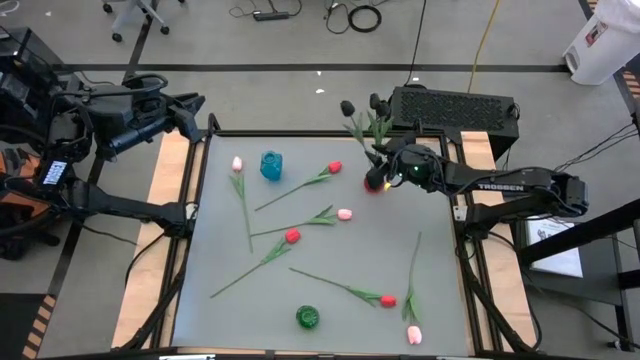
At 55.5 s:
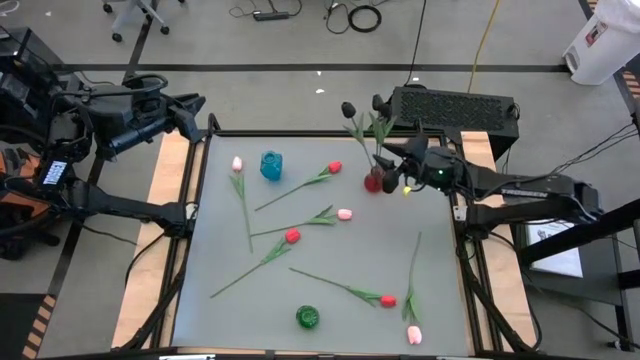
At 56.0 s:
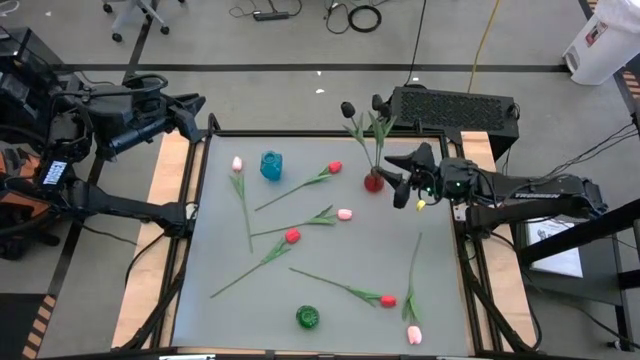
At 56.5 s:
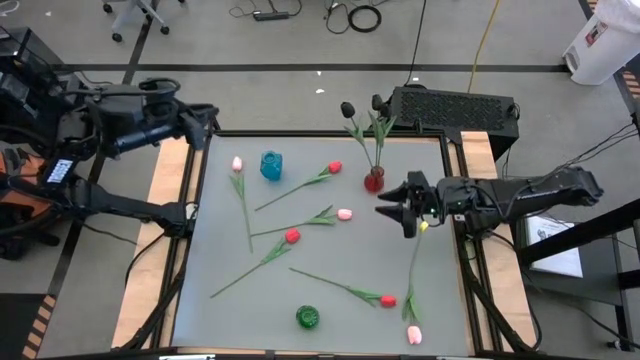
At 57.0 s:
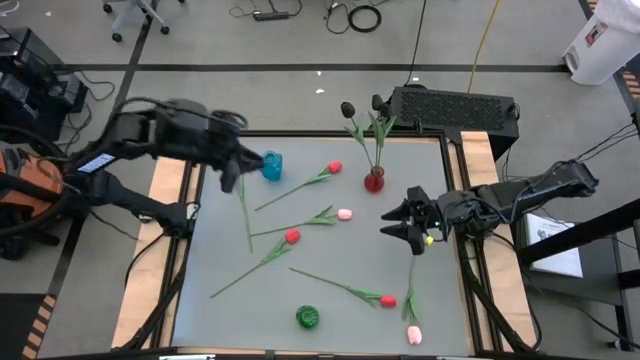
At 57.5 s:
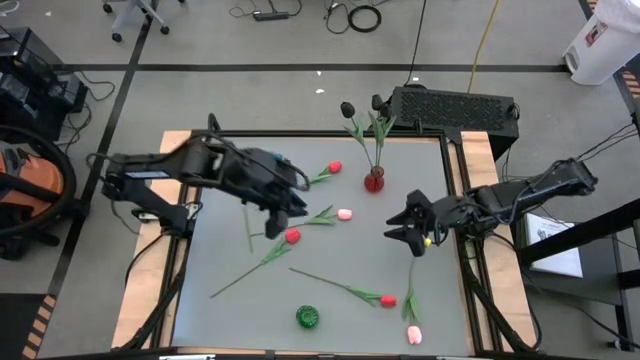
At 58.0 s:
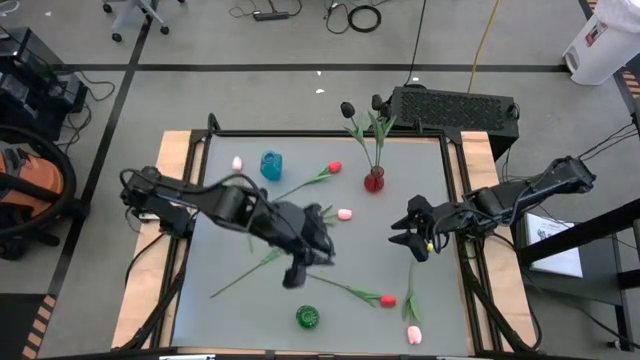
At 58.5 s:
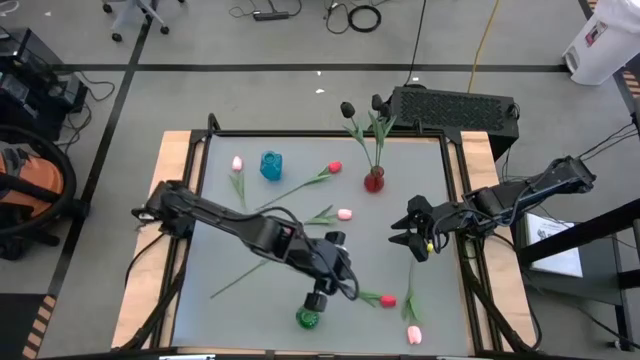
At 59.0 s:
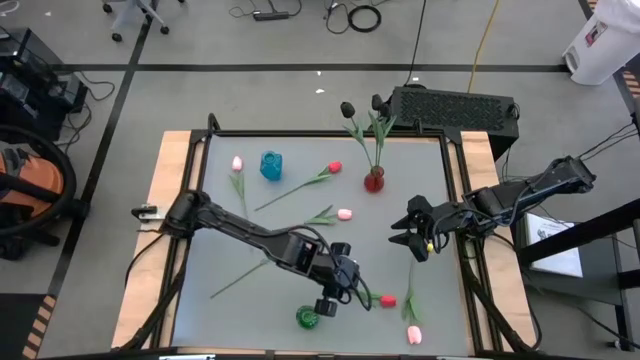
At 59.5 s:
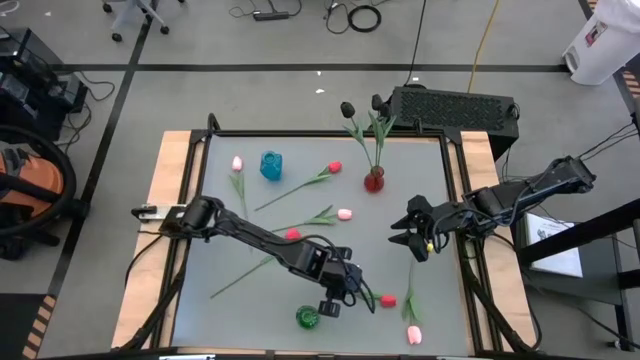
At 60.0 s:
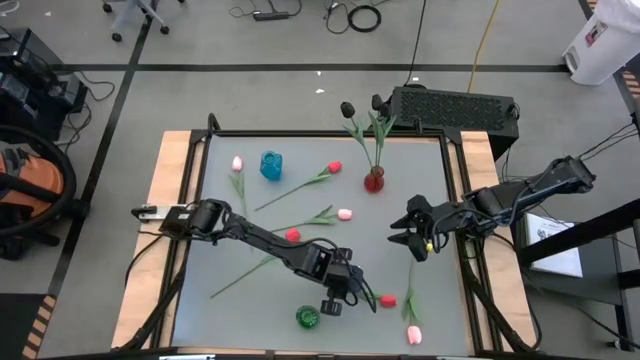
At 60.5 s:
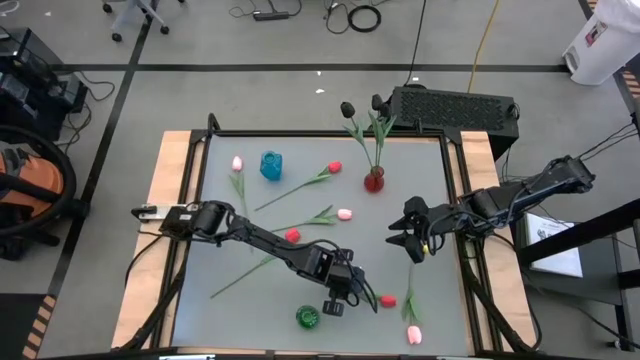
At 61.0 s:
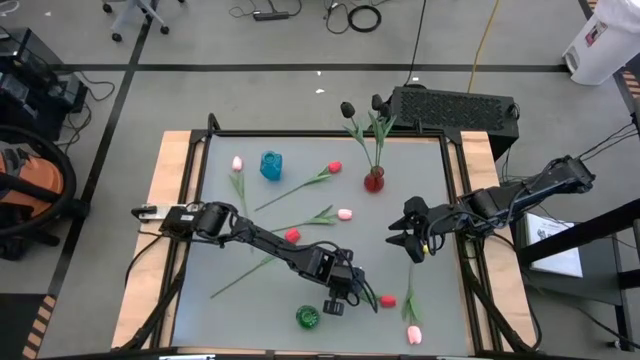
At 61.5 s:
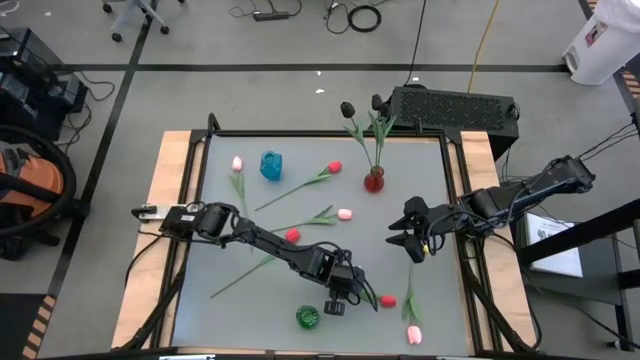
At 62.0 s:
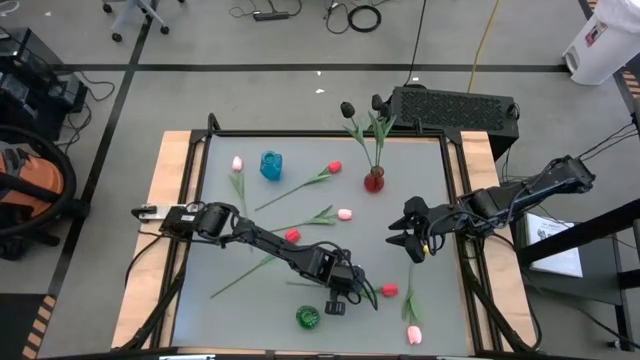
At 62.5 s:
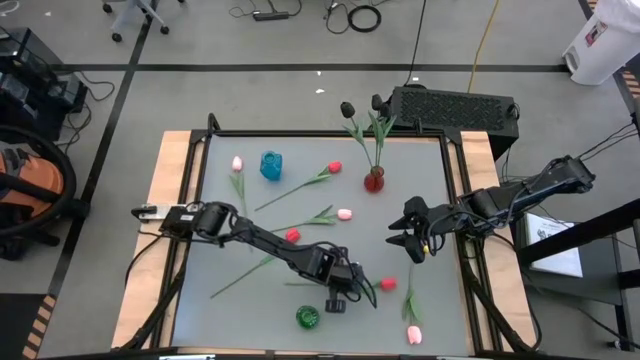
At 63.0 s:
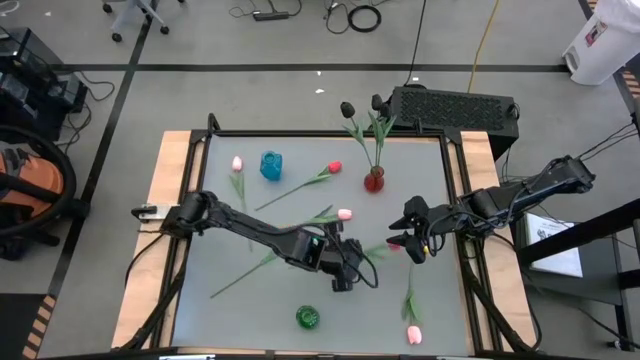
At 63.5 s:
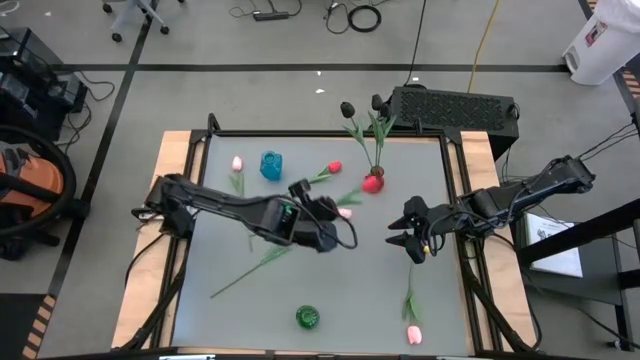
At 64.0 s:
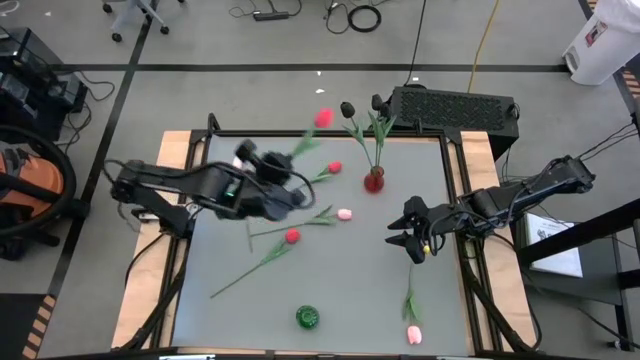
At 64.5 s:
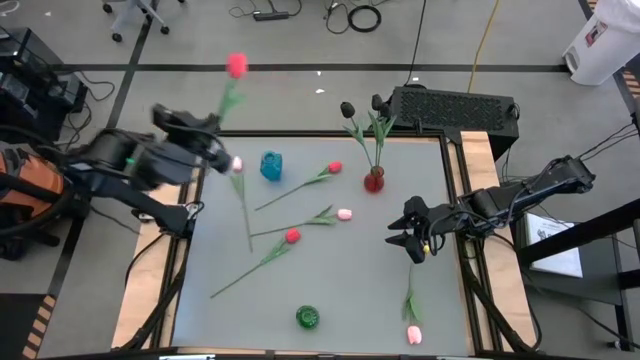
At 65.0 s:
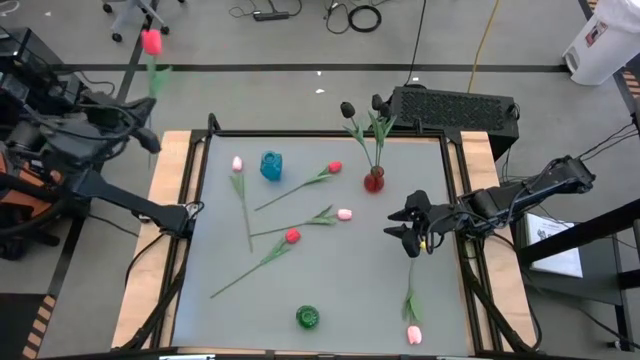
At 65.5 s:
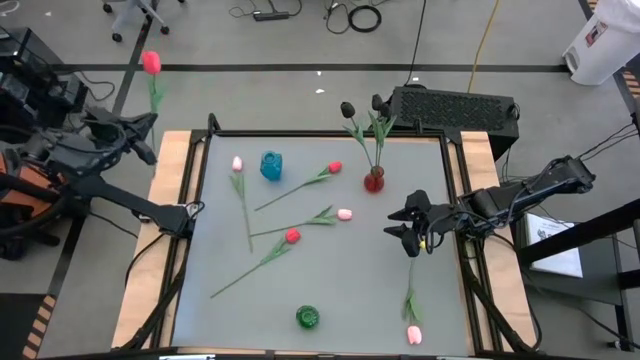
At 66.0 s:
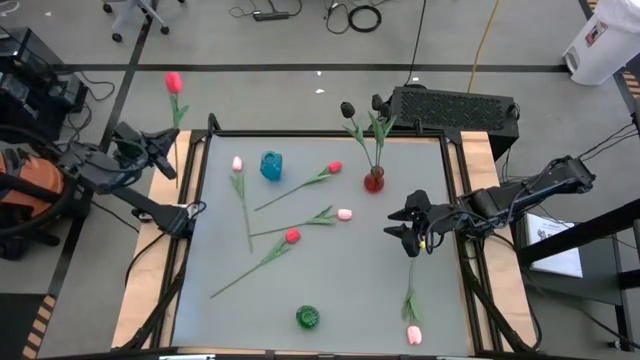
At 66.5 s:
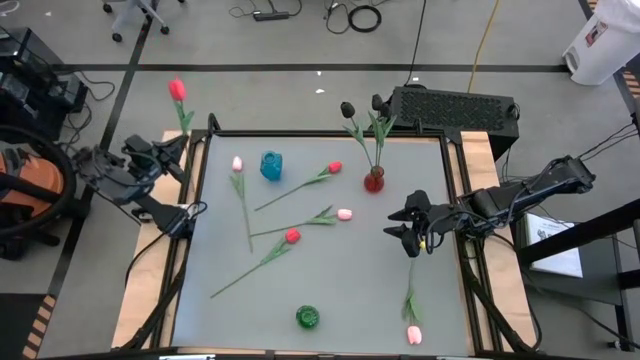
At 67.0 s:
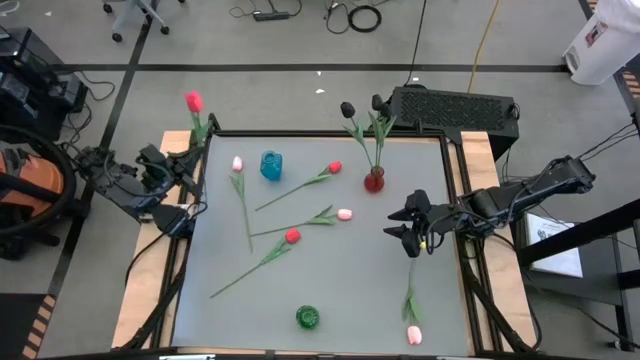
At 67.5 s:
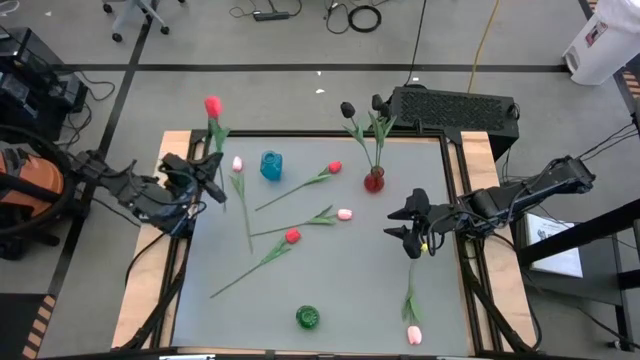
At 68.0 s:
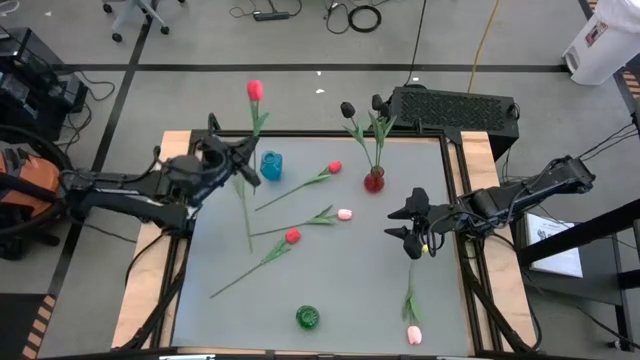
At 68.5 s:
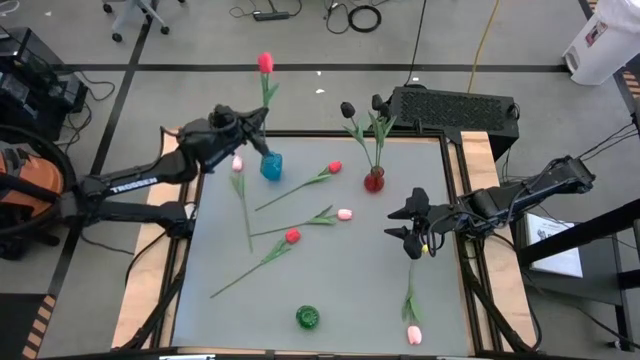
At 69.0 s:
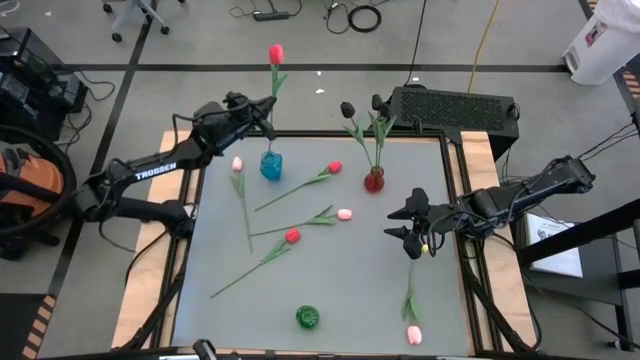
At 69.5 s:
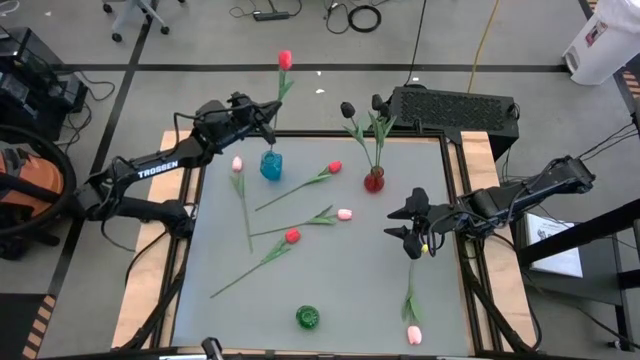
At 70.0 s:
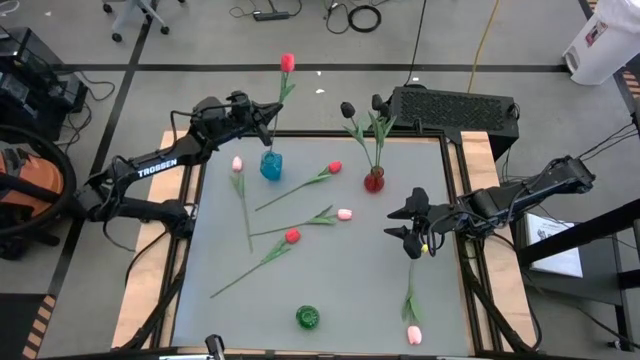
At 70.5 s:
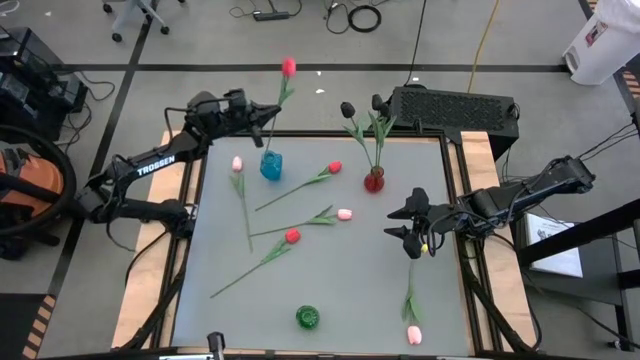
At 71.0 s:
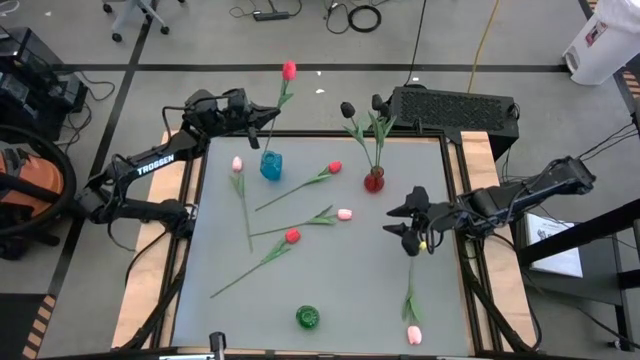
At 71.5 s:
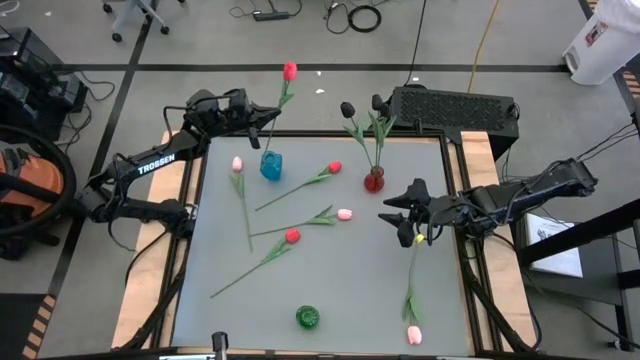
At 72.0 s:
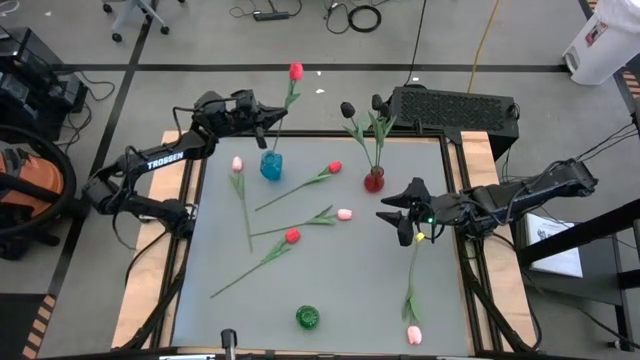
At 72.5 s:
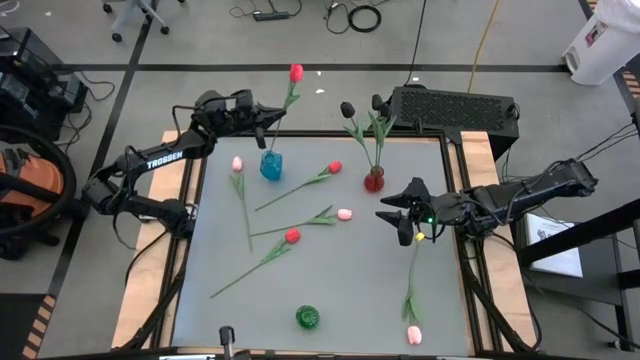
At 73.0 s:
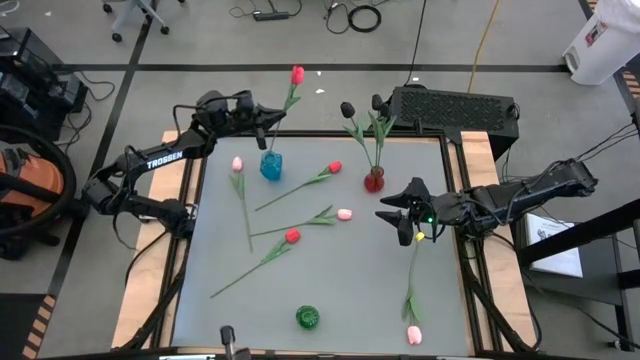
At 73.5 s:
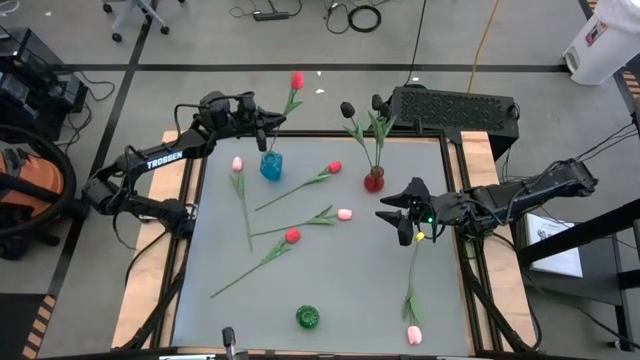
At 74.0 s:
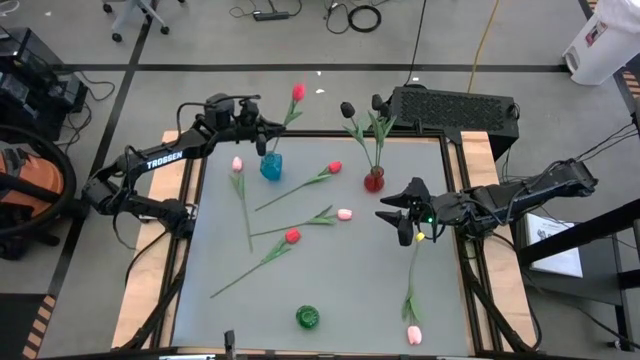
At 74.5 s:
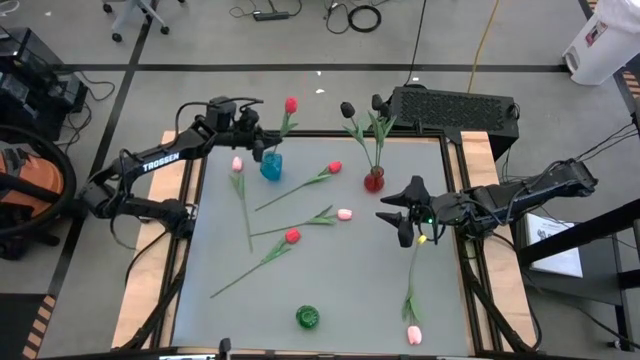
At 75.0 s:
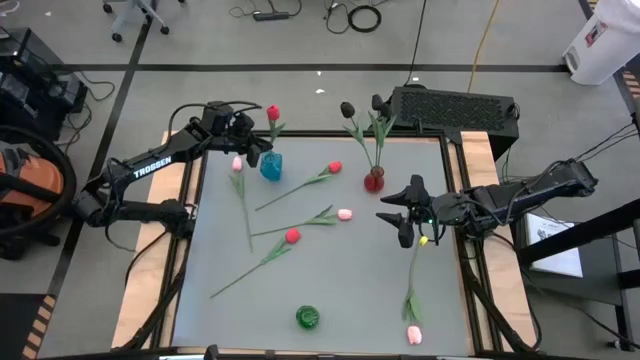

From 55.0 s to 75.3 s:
Task: Sort flowers into vase by color
Put the bottom orange tulip into the blue vase

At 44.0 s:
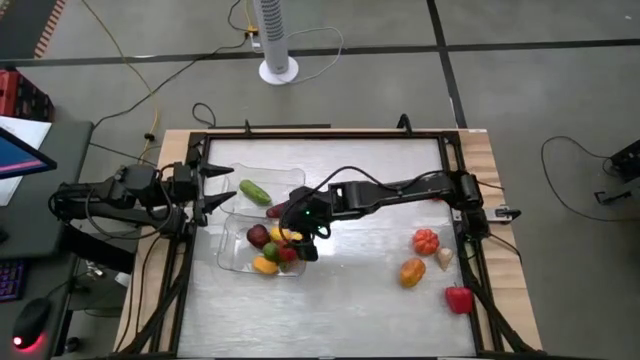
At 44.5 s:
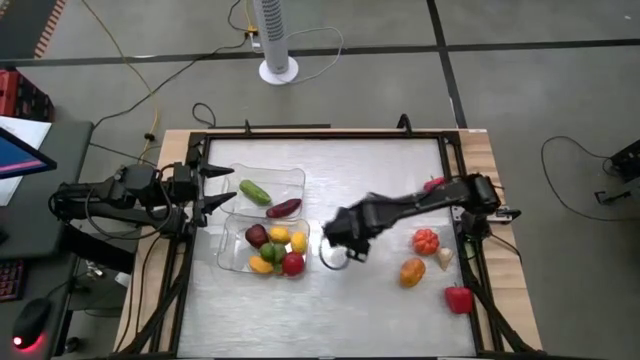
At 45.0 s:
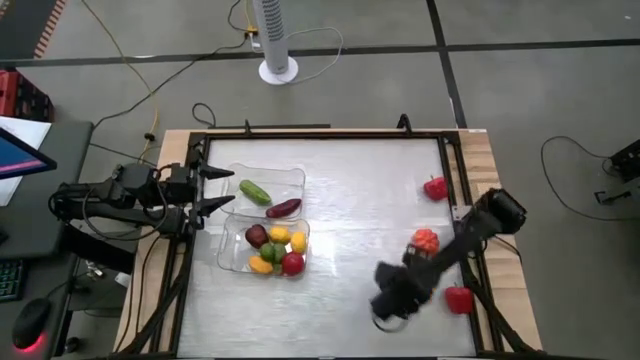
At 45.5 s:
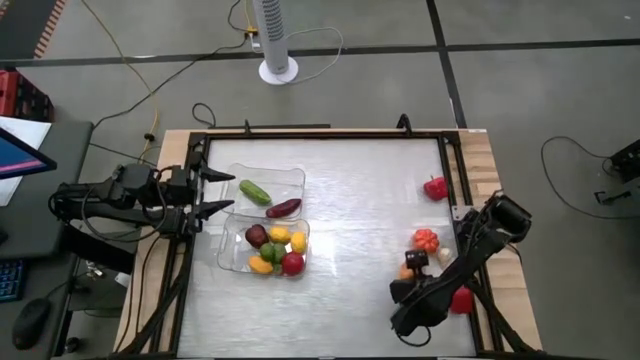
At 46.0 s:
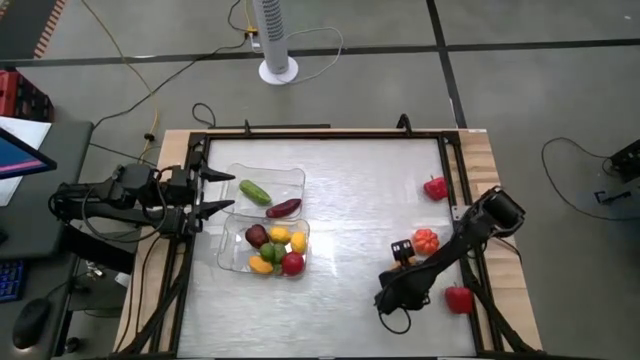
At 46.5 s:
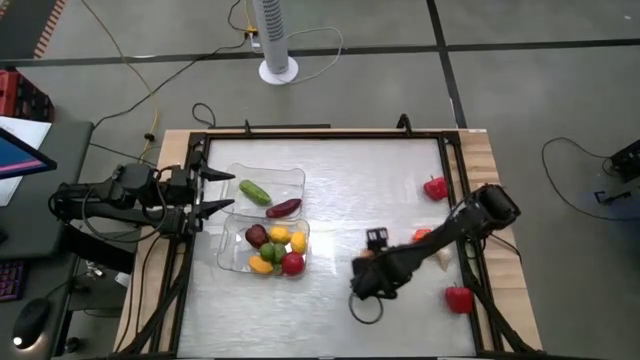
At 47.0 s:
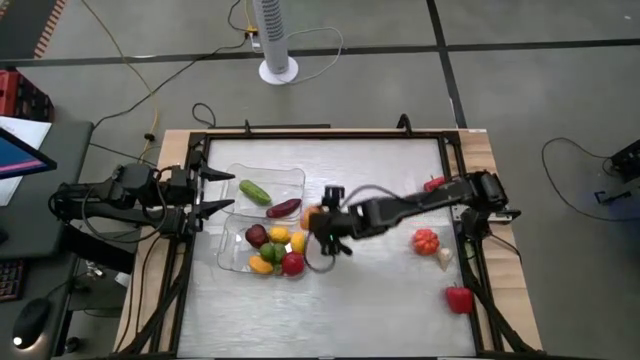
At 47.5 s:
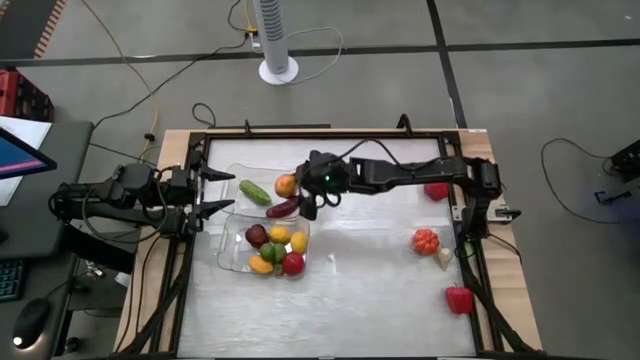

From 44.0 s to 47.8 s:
Task: Sort produce into baskets
Put the brown potato into the top transparent bin
